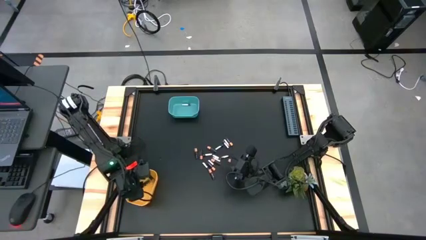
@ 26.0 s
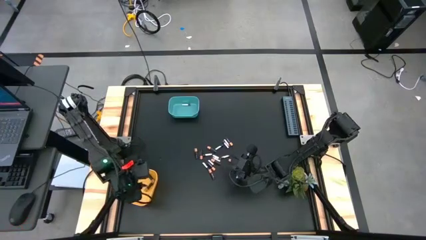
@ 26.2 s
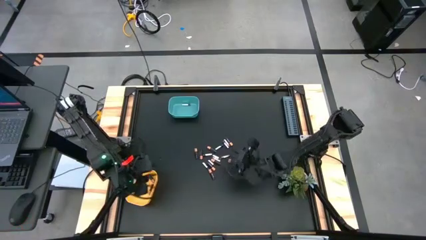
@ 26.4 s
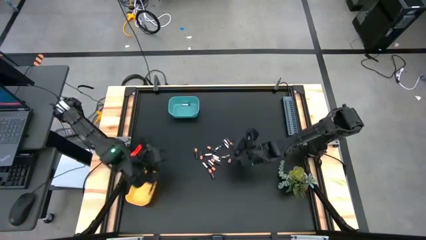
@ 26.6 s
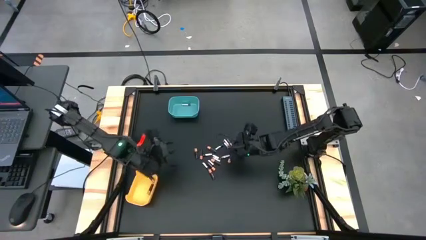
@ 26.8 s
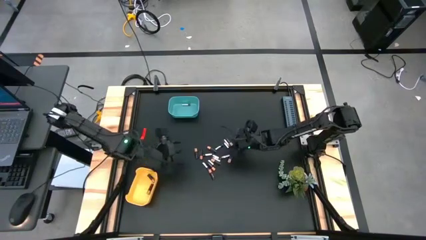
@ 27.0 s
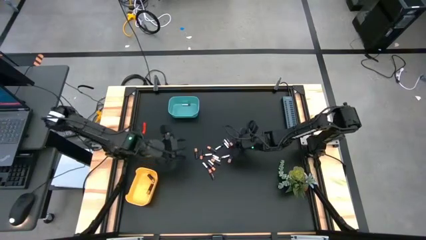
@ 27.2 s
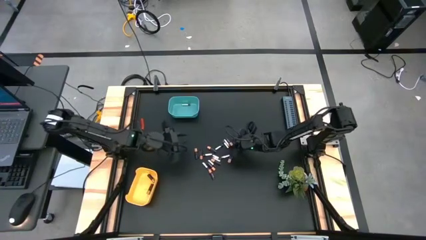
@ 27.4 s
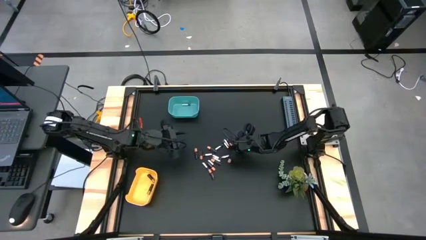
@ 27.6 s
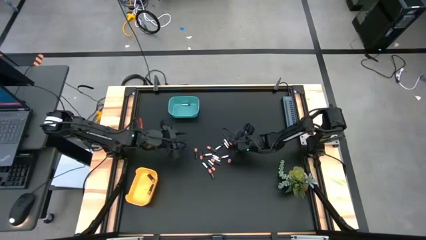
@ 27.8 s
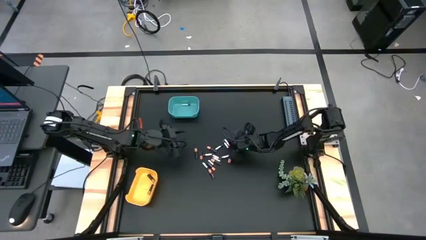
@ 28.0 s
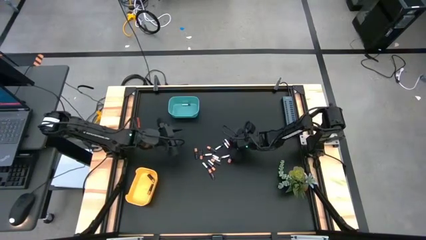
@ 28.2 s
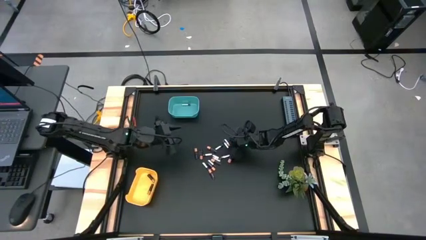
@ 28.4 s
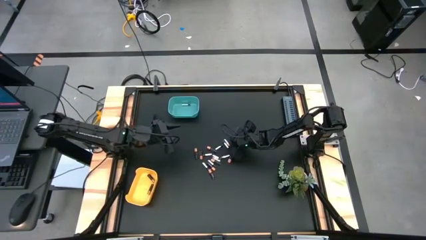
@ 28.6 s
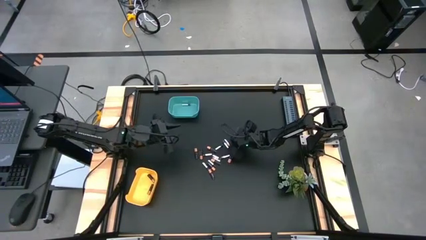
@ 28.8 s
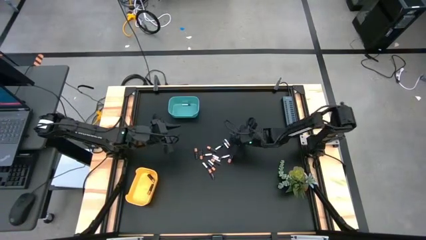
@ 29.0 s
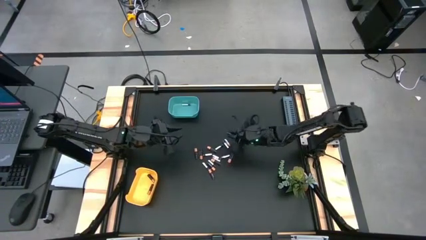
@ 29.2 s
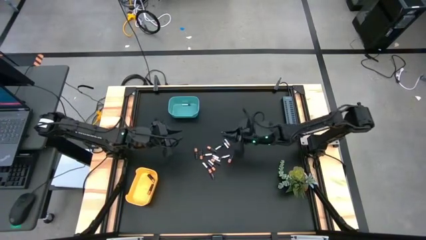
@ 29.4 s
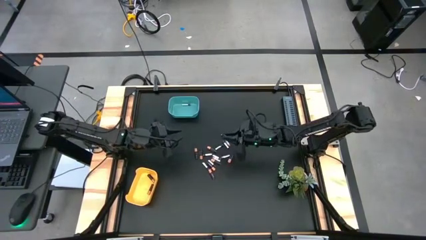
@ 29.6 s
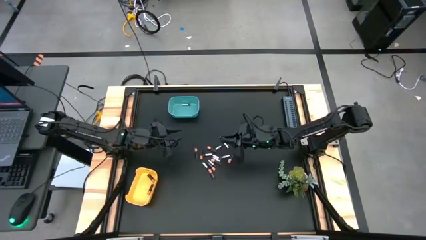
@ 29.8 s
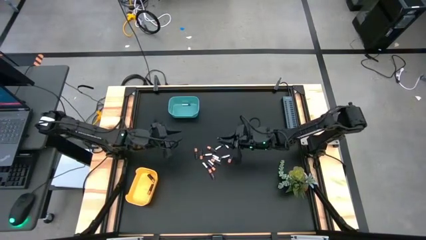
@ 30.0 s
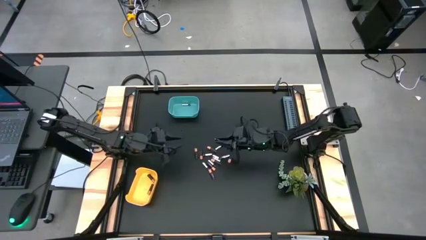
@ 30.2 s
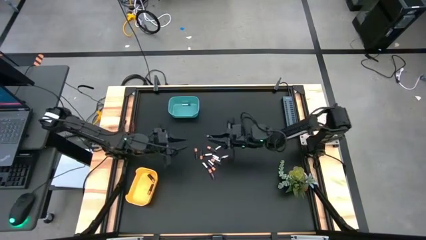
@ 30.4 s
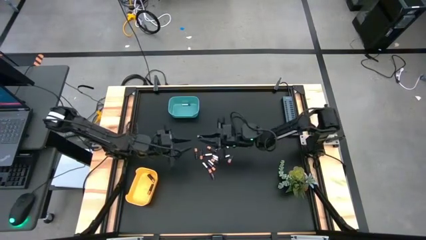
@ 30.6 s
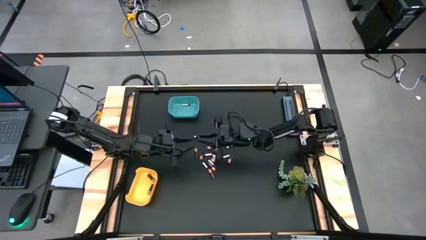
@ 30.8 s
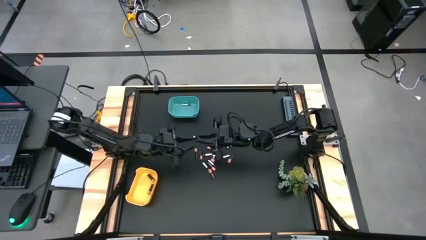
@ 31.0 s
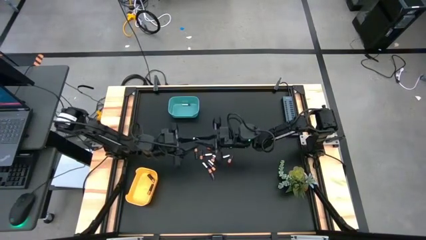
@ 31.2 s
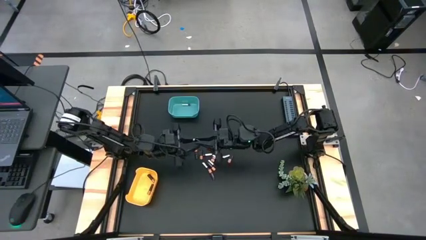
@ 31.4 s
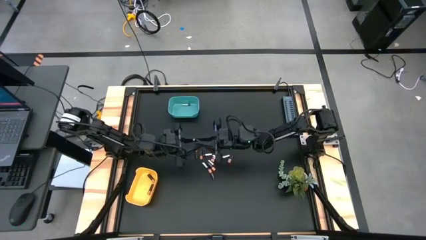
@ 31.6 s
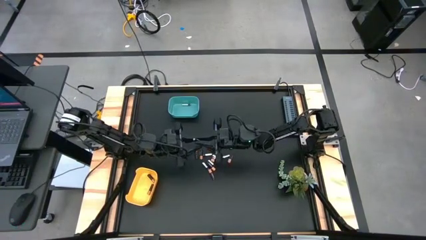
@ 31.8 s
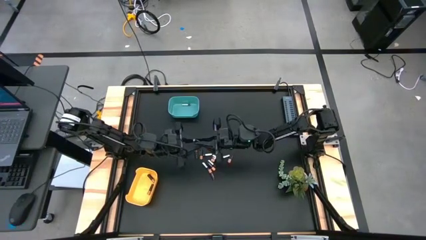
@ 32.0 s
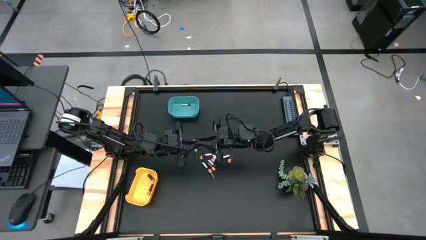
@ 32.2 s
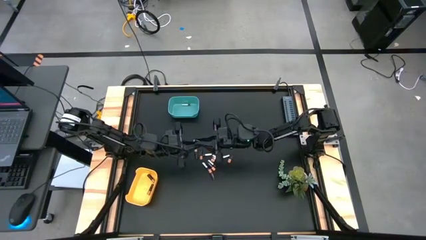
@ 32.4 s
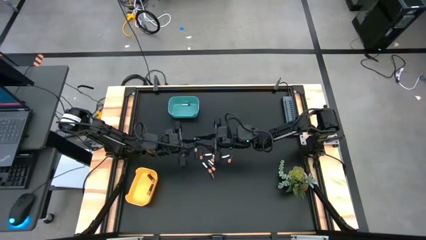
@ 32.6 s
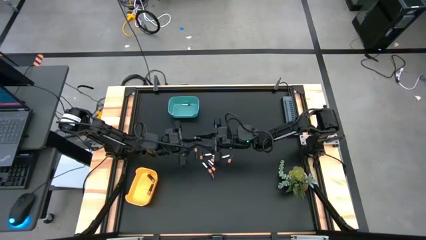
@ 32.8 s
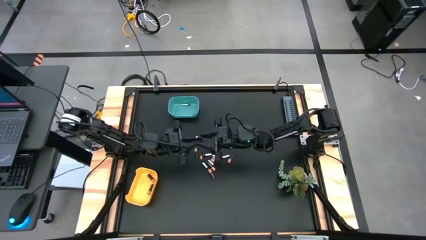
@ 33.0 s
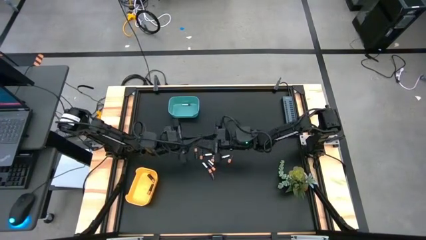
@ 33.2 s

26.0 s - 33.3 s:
Task: Sort batteries
Put the black battery into the yellow bin

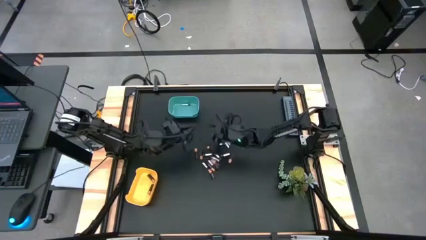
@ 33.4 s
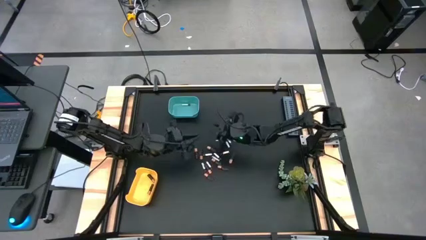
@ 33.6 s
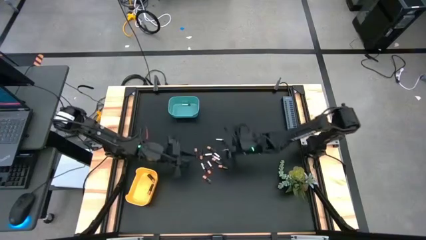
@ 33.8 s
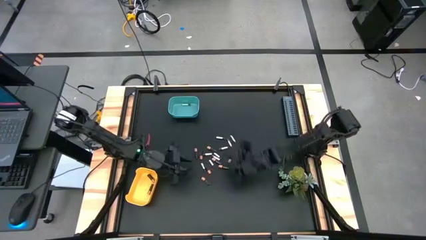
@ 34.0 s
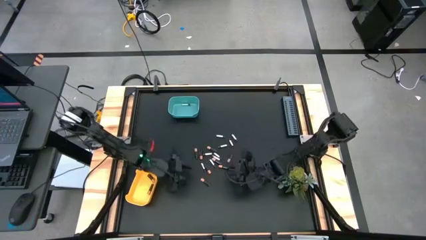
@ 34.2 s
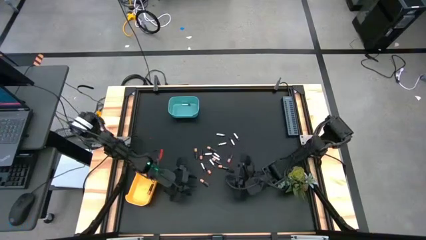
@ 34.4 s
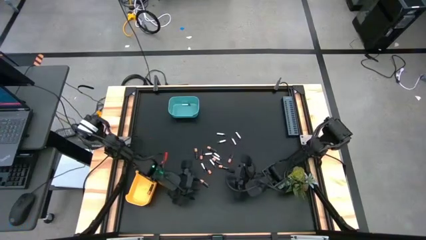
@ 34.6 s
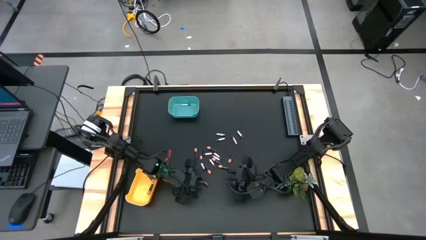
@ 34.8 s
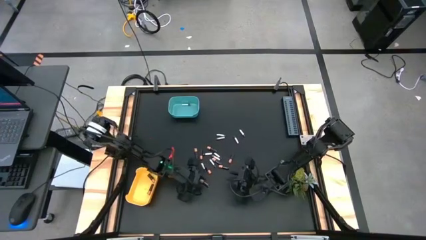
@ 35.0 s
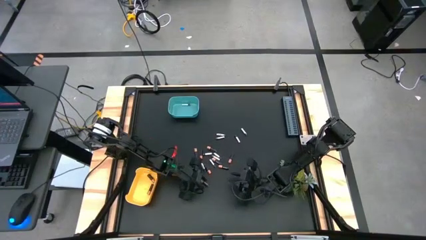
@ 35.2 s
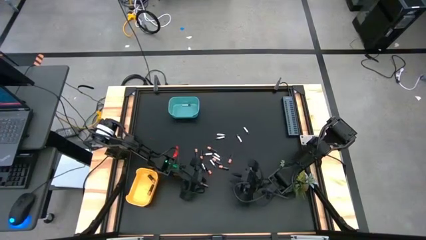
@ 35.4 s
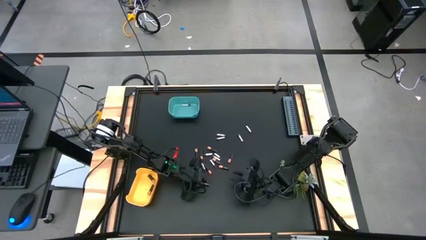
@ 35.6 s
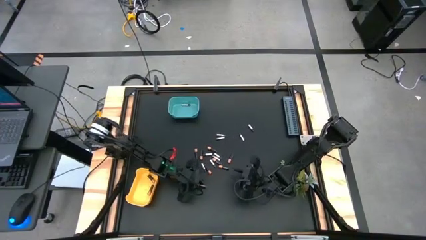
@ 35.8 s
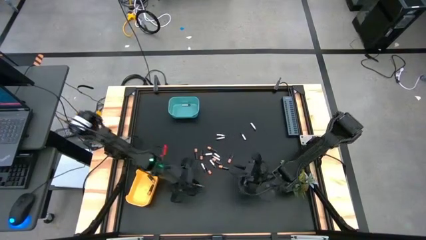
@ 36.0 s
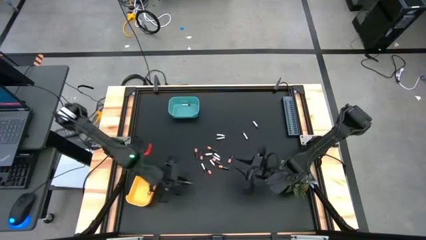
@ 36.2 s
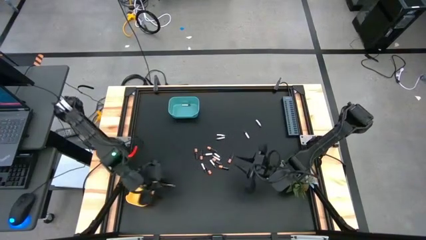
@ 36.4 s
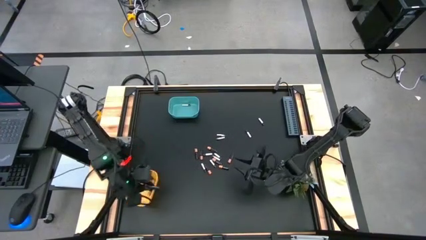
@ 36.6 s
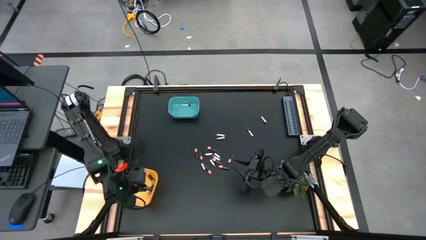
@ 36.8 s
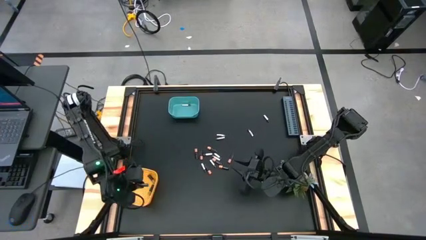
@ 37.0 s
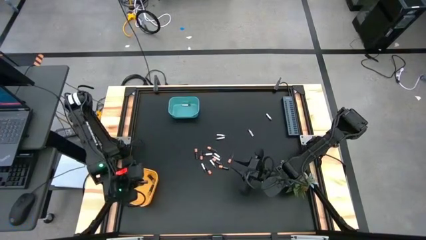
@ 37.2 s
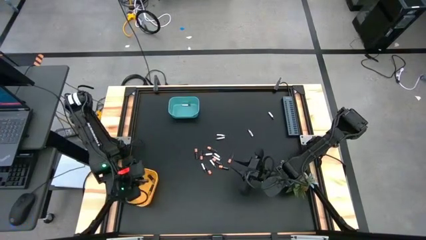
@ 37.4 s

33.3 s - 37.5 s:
Put the black battery into the yellow bin

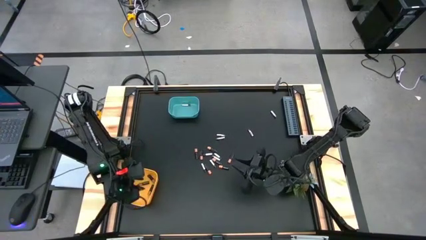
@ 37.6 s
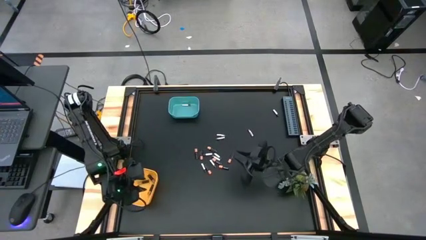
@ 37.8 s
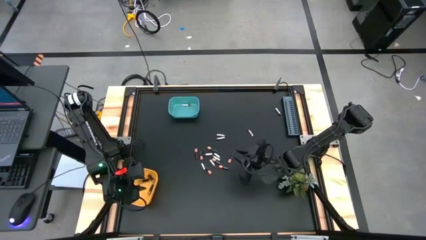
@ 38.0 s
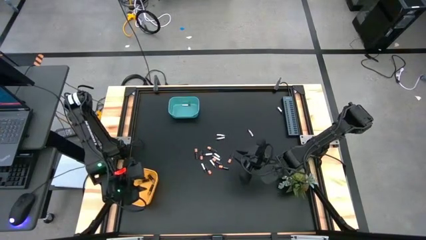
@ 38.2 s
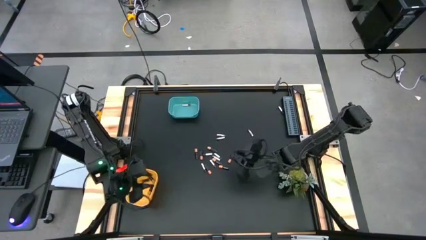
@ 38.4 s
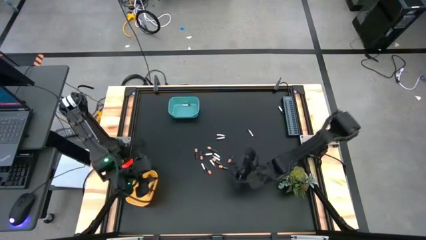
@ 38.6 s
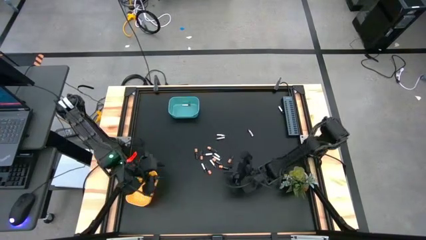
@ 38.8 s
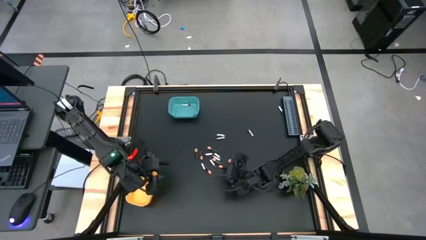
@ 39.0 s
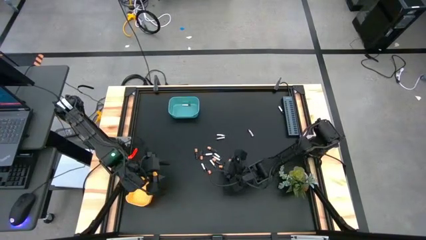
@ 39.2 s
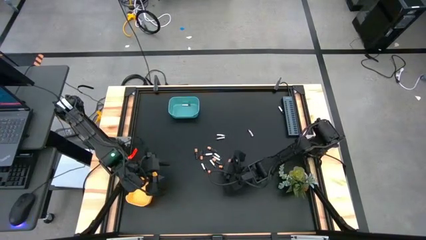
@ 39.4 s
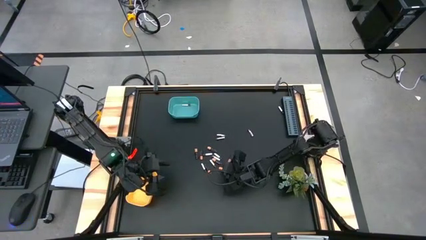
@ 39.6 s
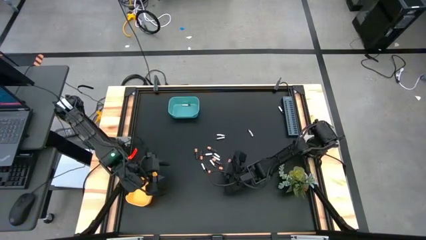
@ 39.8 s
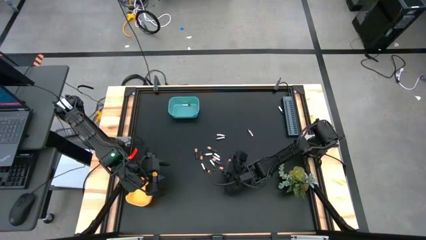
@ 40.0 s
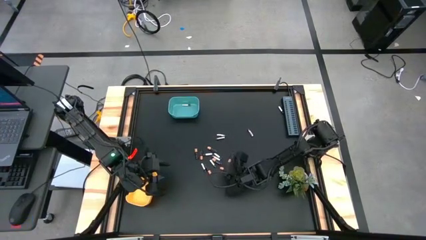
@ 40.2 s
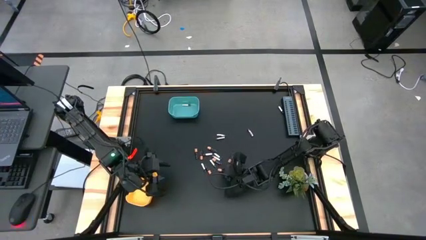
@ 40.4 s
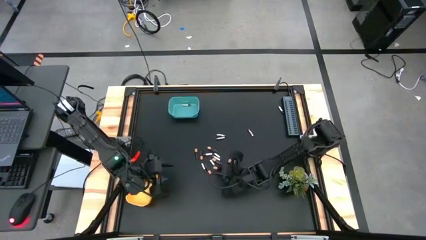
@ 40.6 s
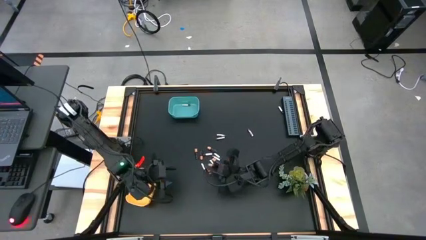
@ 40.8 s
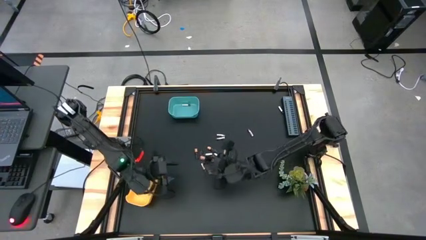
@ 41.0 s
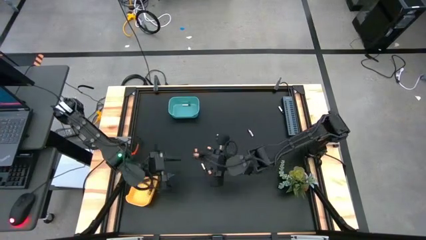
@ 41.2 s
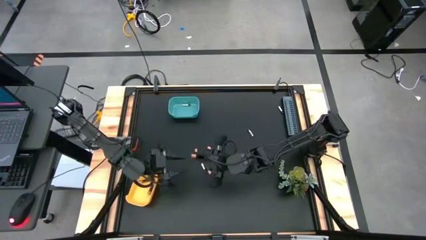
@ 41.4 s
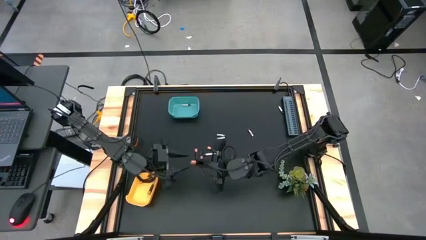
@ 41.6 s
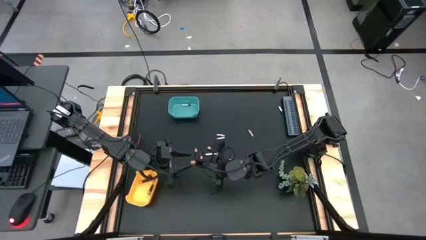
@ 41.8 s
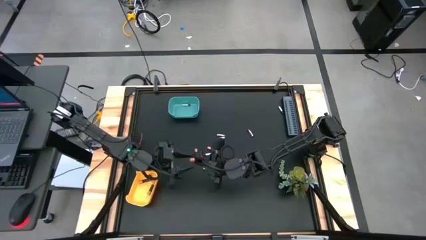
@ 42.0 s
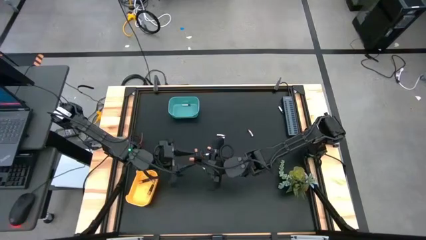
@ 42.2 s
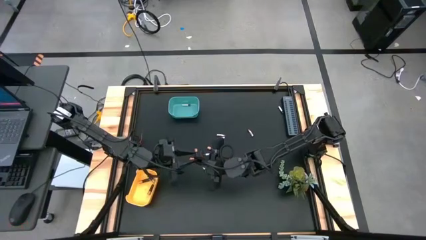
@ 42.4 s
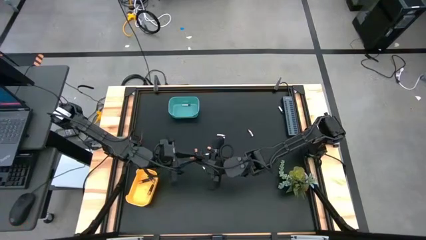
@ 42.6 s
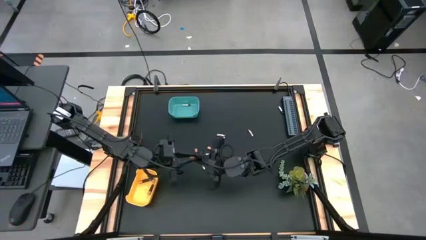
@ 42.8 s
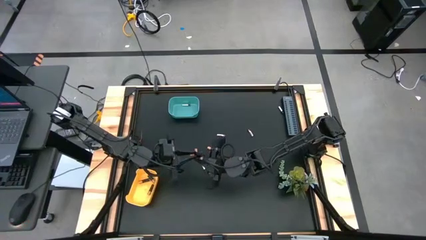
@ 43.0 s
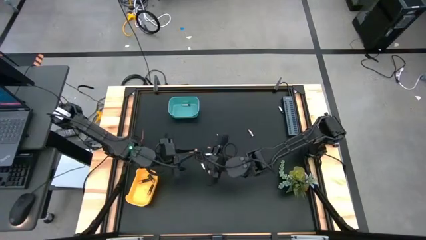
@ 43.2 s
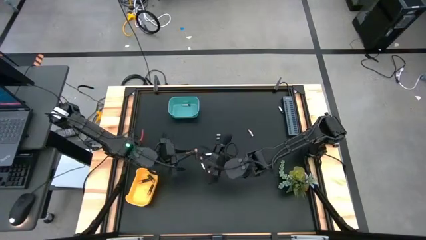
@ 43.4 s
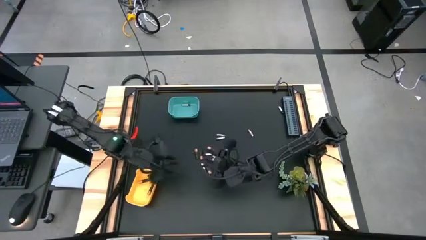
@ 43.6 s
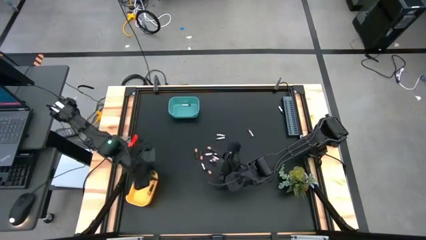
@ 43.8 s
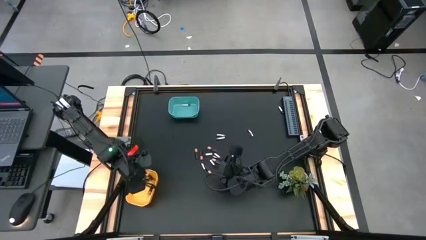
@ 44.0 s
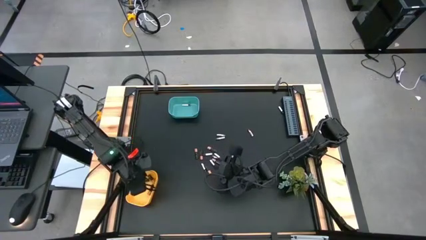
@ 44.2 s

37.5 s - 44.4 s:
Put the black battery into the yellow bin
